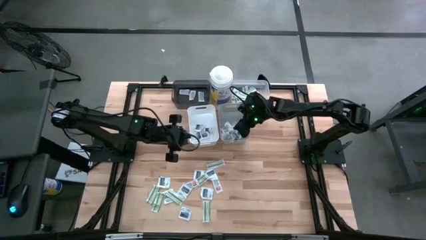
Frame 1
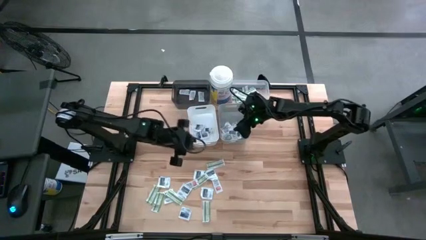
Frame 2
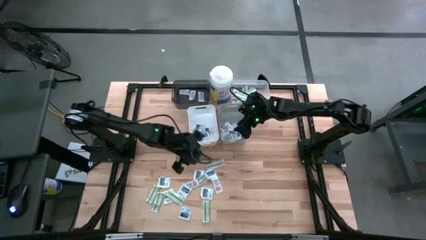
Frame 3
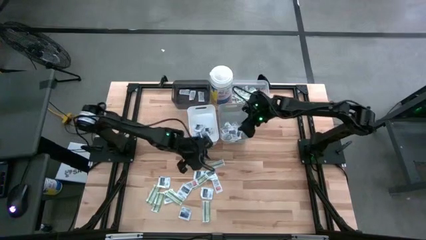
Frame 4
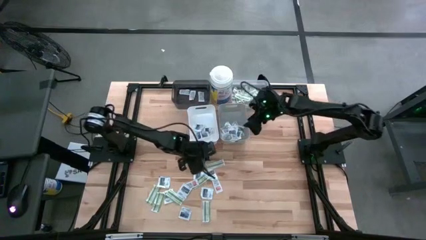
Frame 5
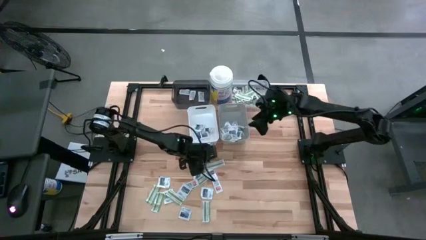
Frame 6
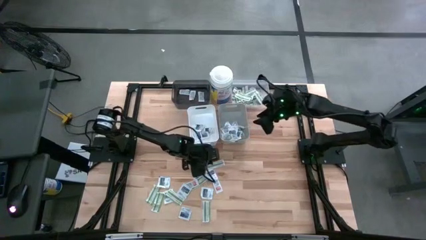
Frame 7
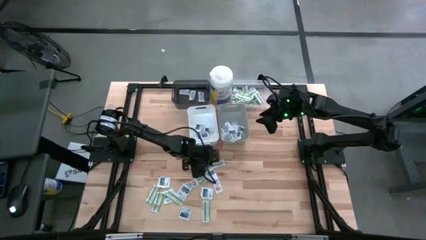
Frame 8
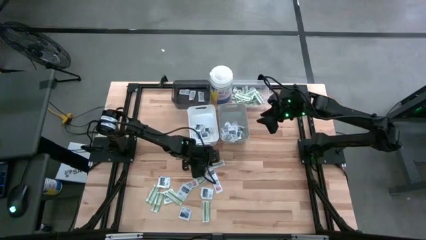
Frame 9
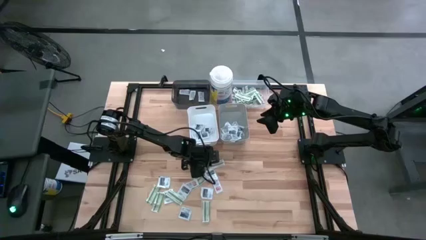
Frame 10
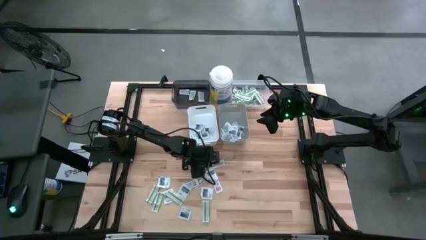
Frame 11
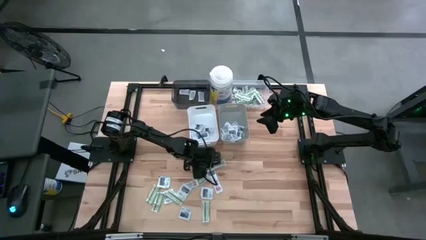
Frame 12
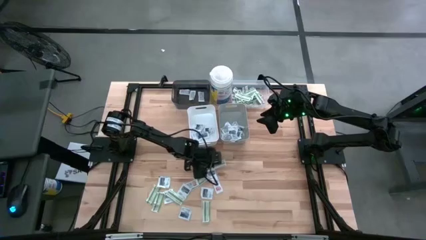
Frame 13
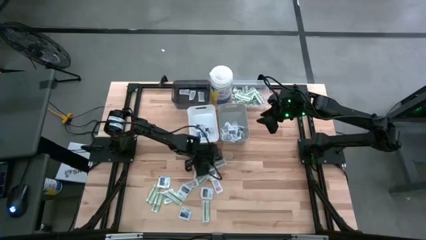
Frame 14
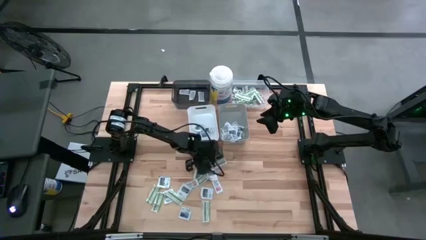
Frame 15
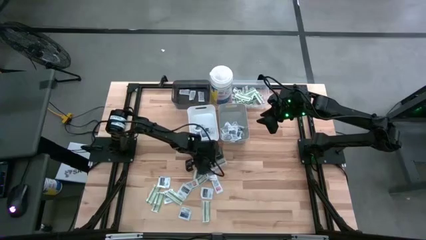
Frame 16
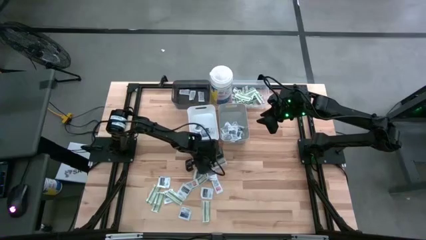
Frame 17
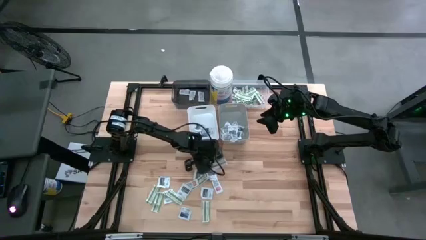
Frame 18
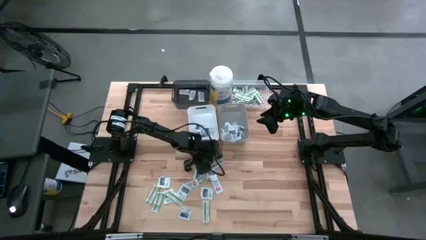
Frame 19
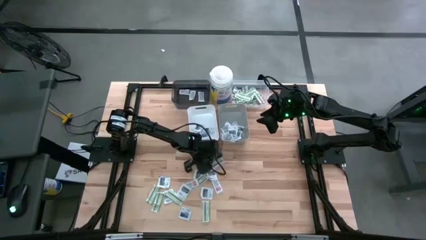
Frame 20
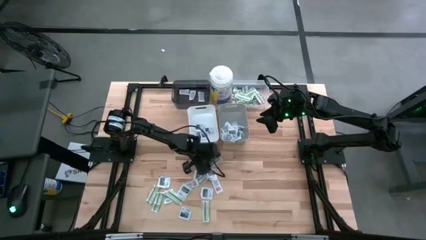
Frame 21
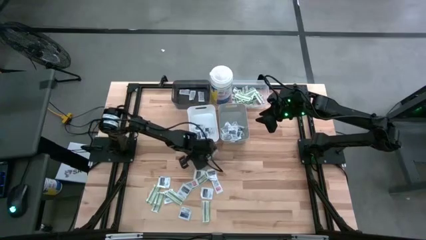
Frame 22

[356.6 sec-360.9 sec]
Task: Pick & Place First Aid Supplies
Put the band aid into the transparent bin

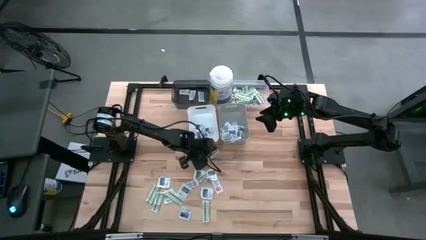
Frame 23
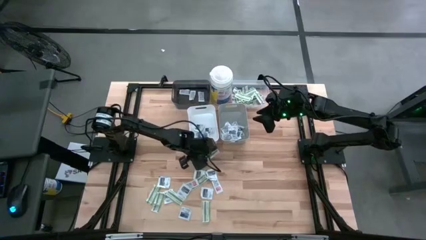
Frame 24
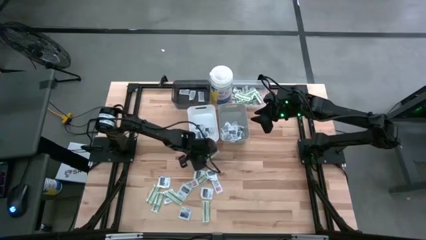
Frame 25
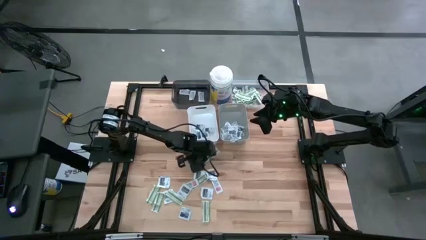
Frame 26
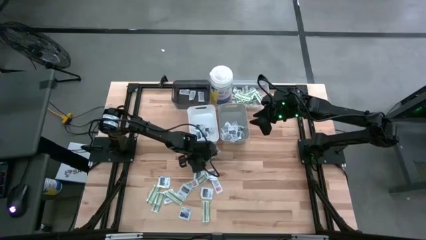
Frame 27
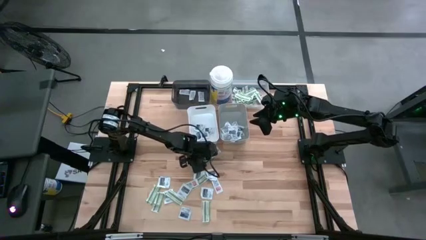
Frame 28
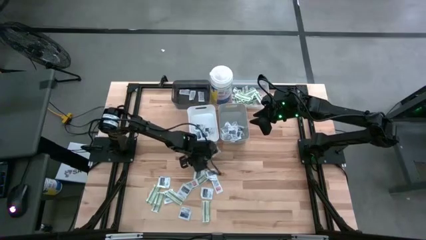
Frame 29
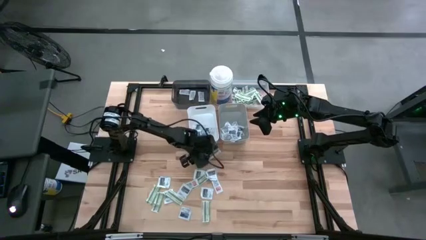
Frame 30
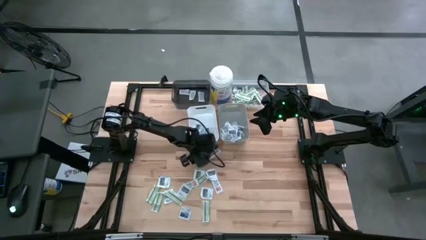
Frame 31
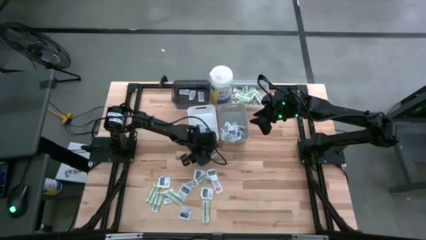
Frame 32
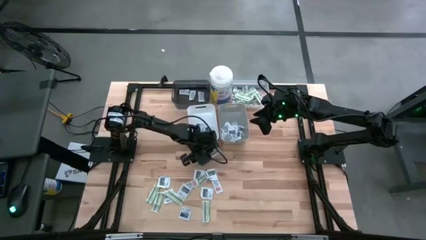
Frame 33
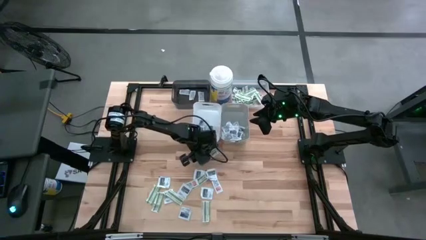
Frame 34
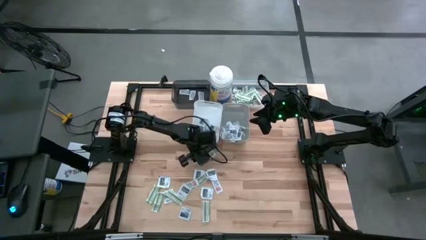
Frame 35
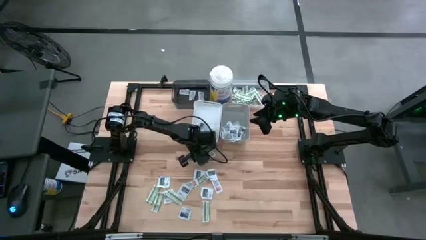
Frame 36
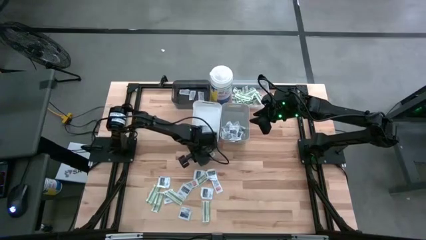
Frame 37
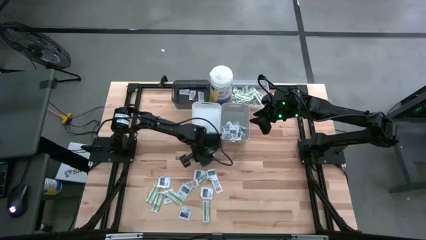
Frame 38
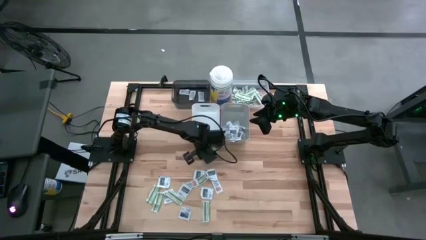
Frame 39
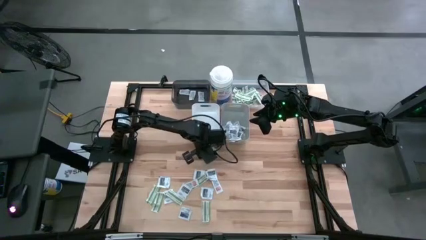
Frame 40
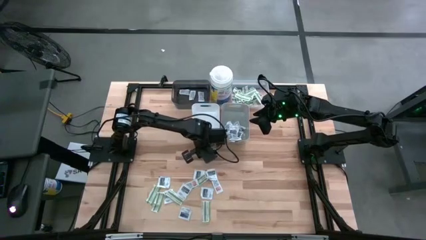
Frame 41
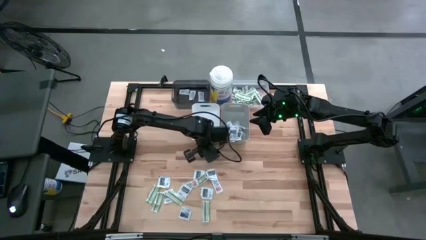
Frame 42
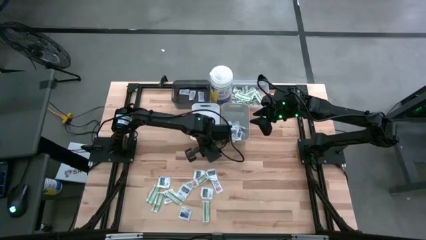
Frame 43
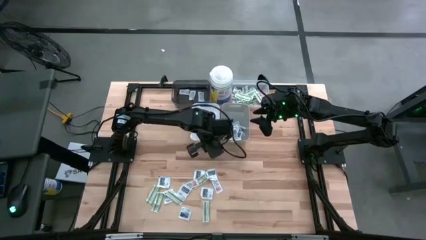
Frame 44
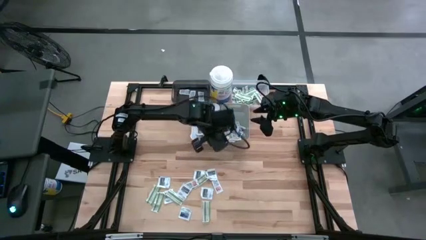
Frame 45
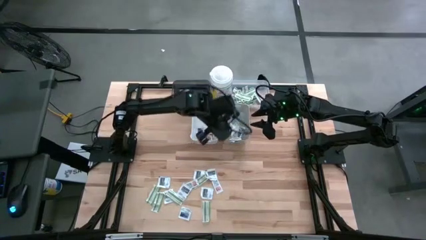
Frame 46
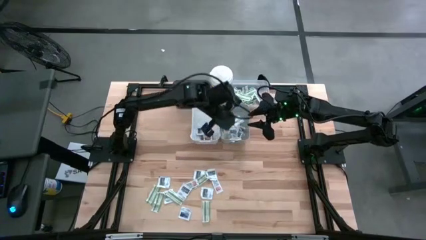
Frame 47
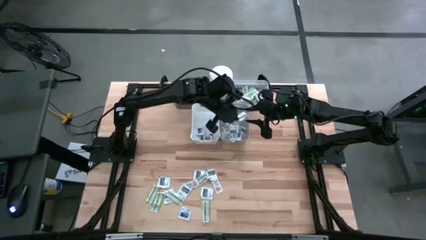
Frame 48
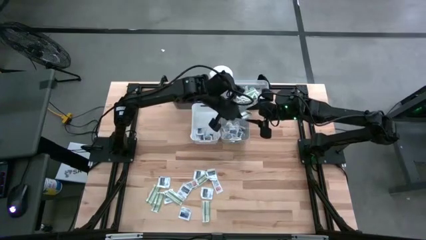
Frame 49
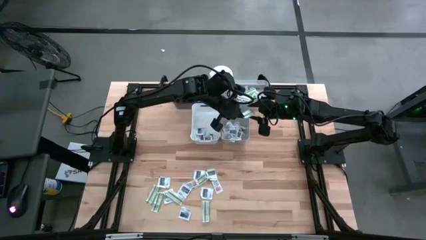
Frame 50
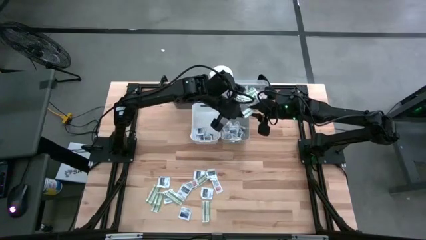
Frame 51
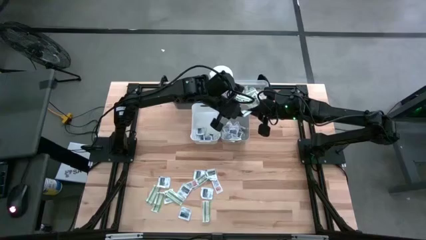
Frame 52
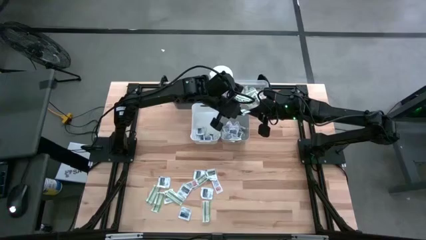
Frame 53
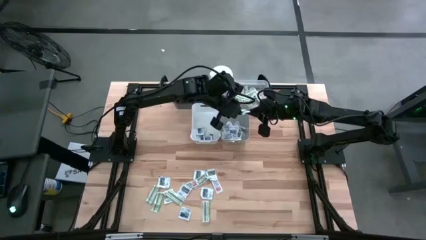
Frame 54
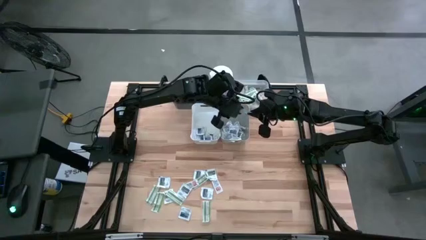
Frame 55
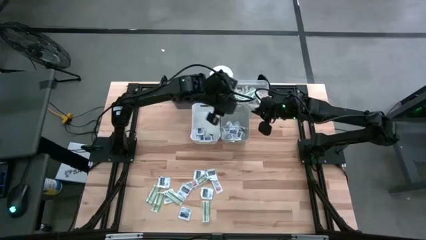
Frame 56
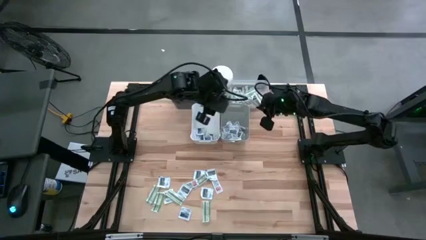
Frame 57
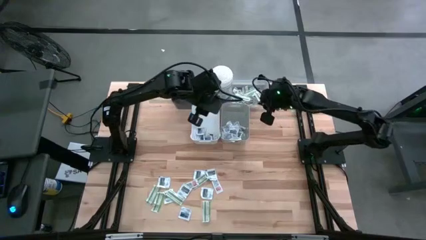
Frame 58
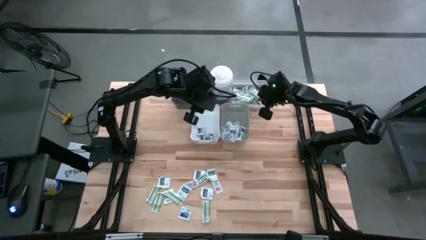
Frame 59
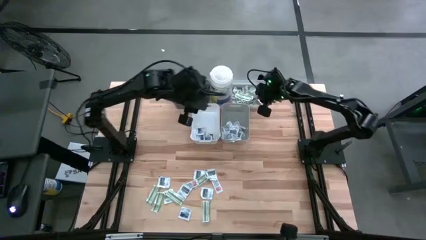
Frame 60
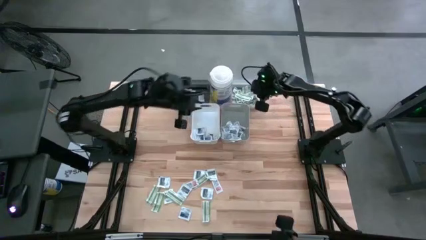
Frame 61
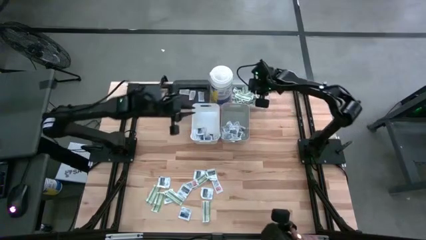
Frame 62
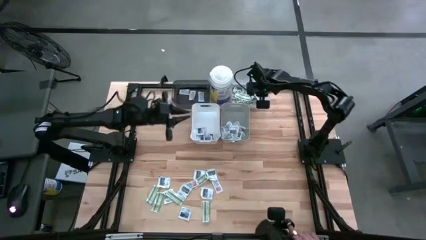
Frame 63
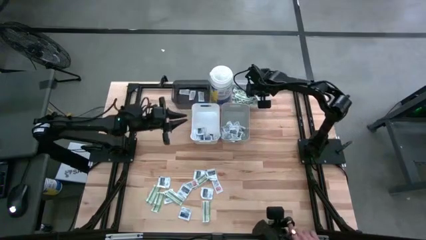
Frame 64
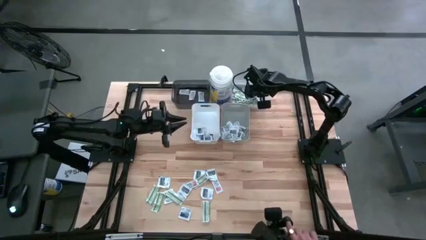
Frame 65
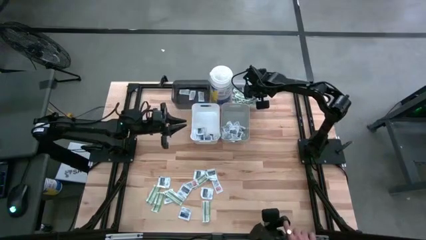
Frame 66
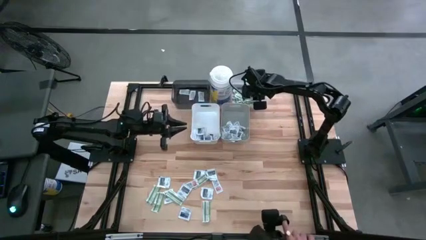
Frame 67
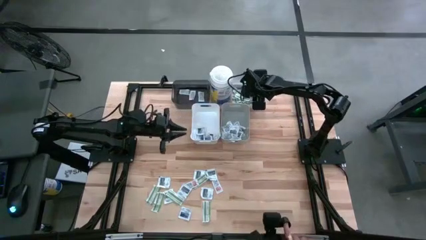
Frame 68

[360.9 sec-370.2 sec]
Put the band aid into the transparent bin
